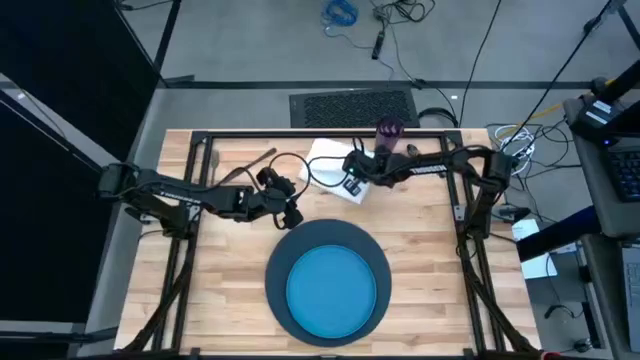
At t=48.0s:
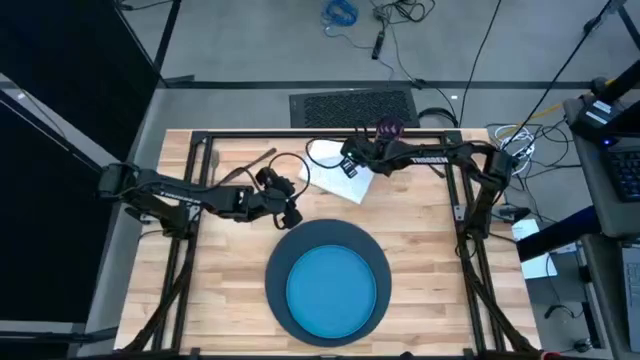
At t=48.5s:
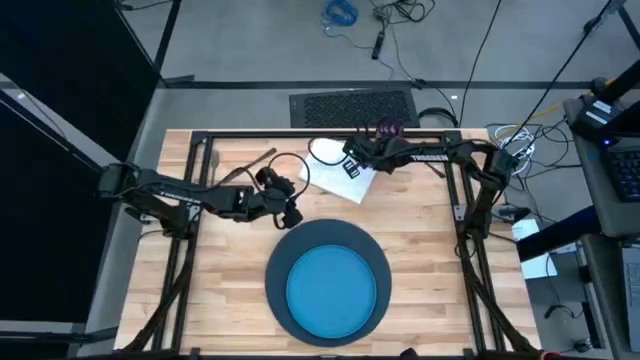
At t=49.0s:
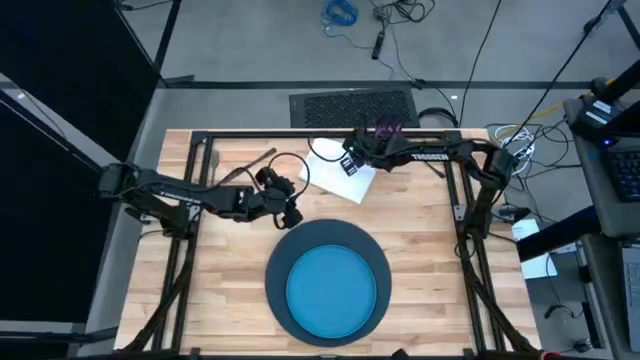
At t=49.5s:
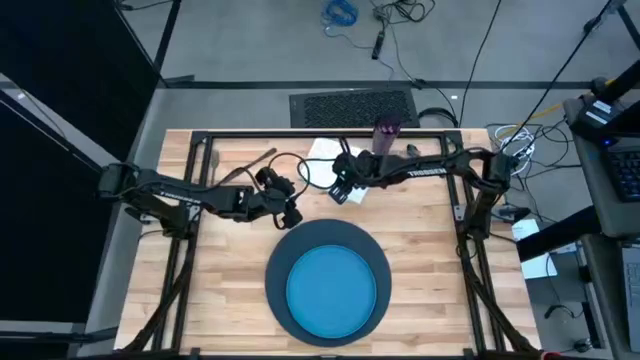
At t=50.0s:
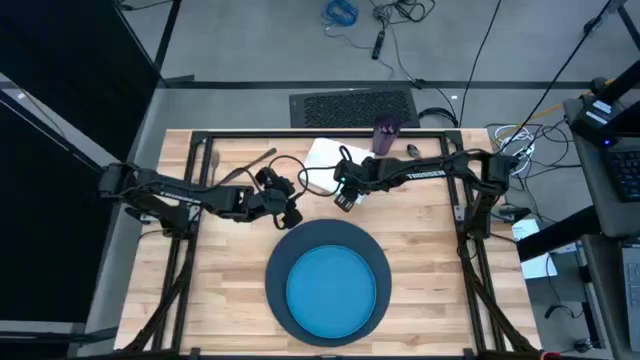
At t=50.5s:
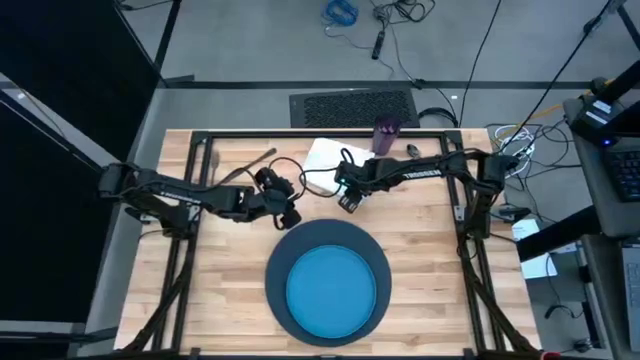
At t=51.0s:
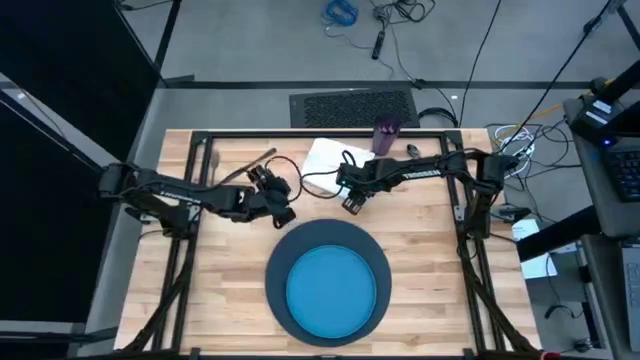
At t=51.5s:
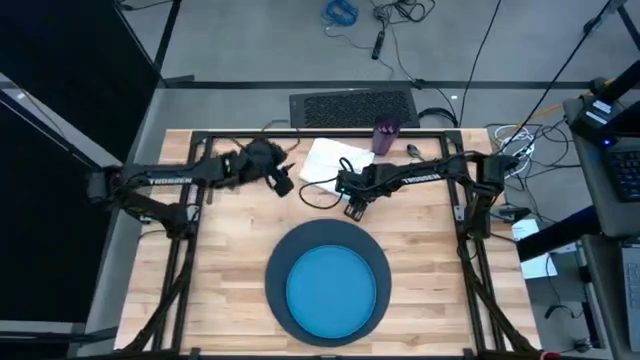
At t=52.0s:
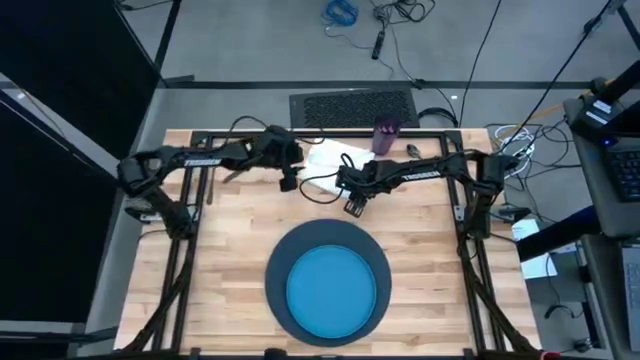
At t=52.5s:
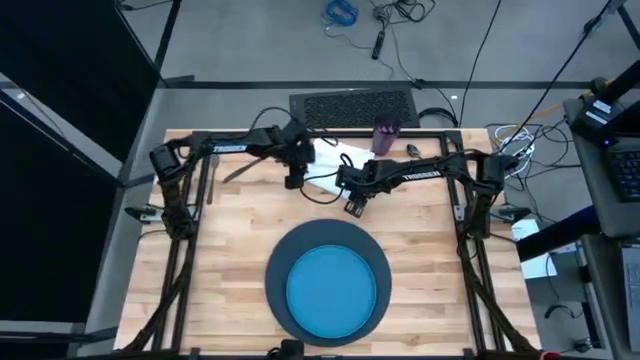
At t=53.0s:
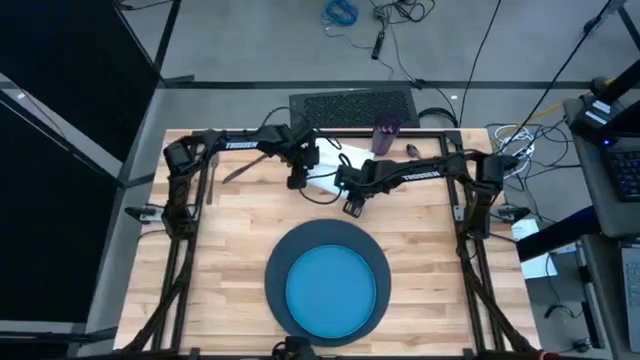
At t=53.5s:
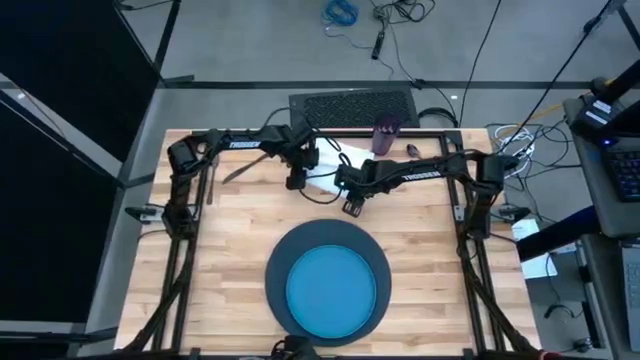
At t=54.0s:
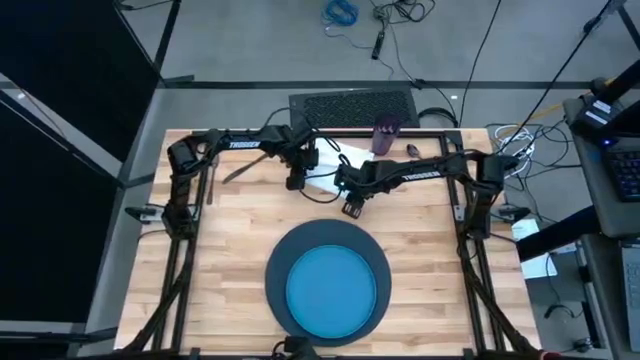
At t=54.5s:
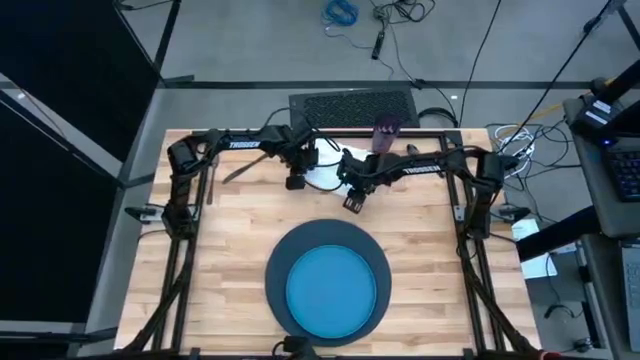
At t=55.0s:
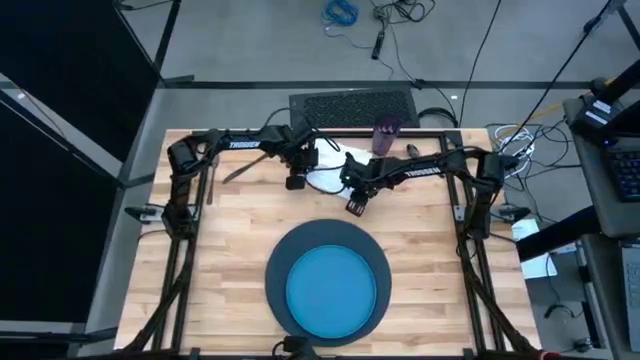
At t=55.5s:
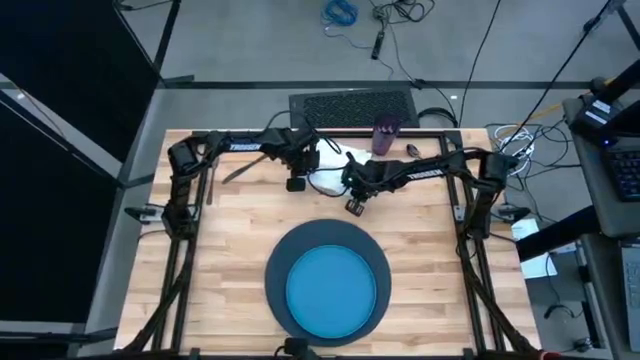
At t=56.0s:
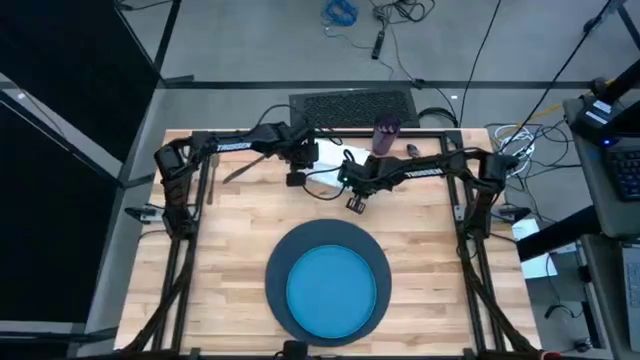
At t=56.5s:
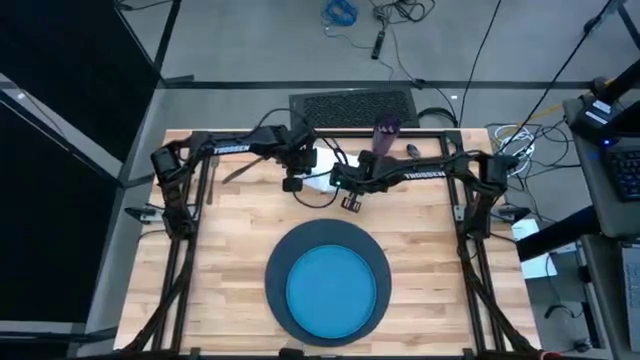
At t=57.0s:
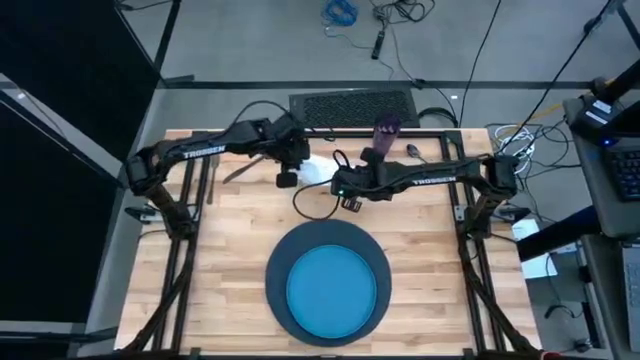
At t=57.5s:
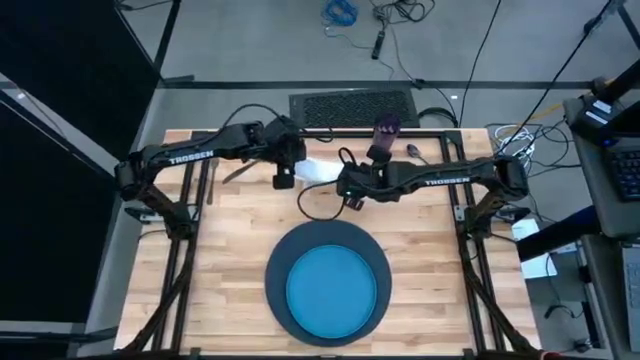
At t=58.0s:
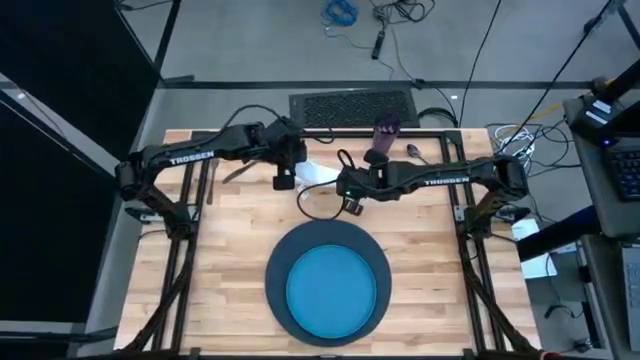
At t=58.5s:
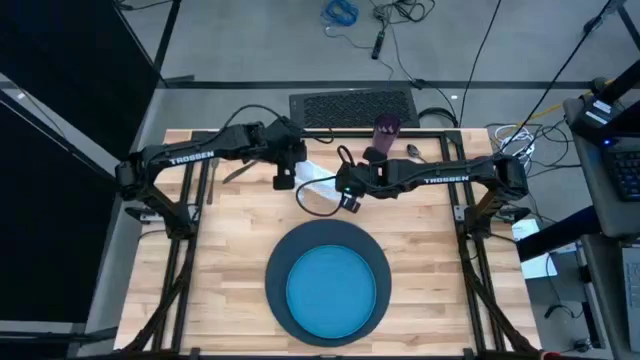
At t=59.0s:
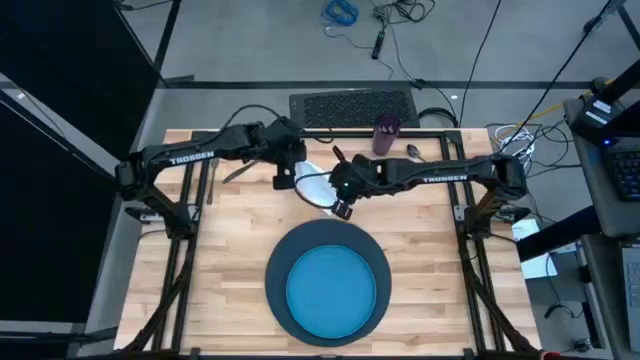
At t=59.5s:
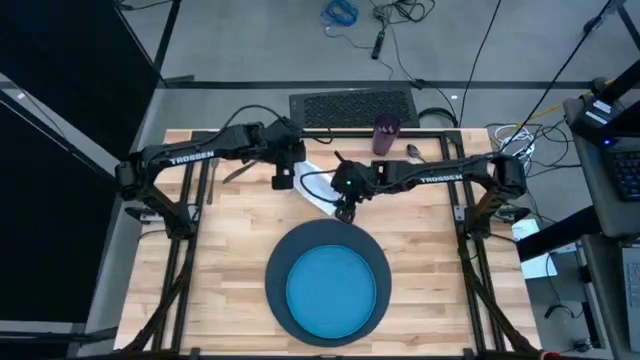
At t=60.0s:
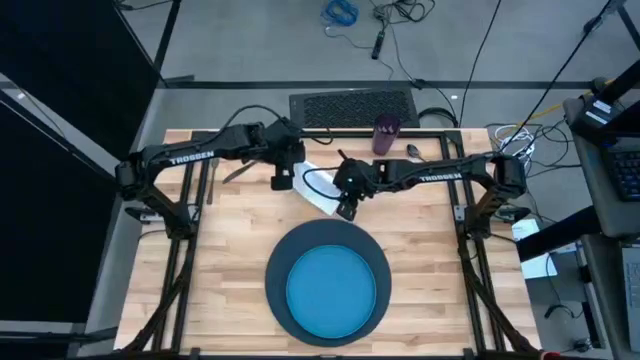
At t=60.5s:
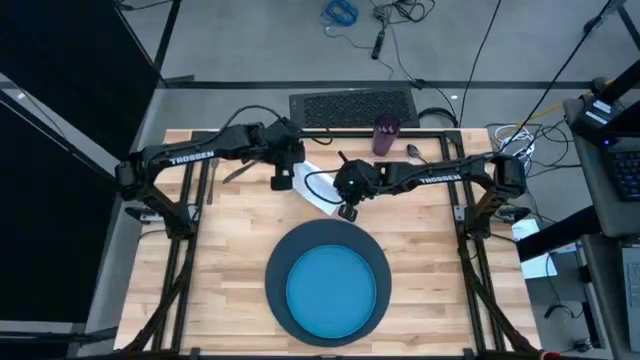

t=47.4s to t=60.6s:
Task: Set table place
Fold the white table napkin

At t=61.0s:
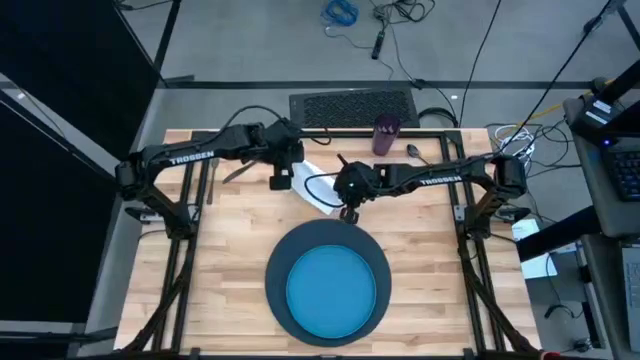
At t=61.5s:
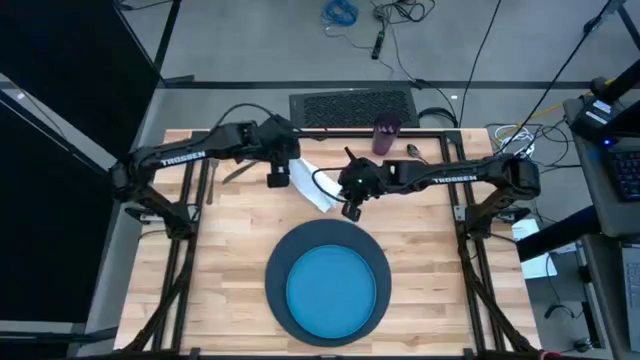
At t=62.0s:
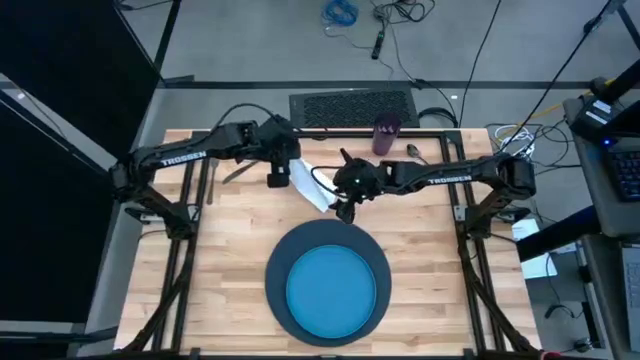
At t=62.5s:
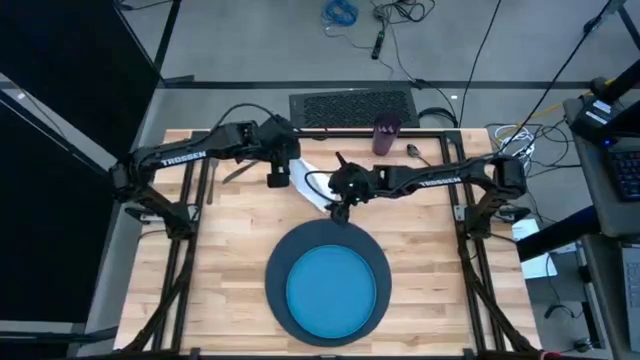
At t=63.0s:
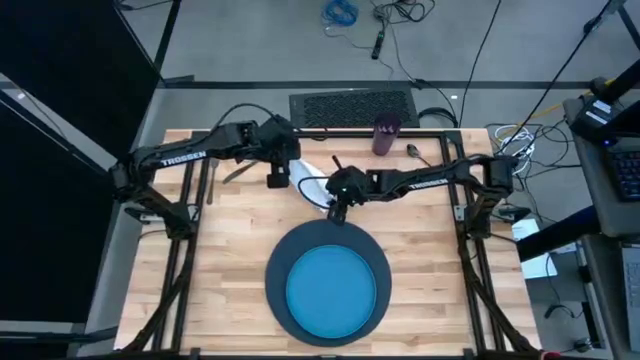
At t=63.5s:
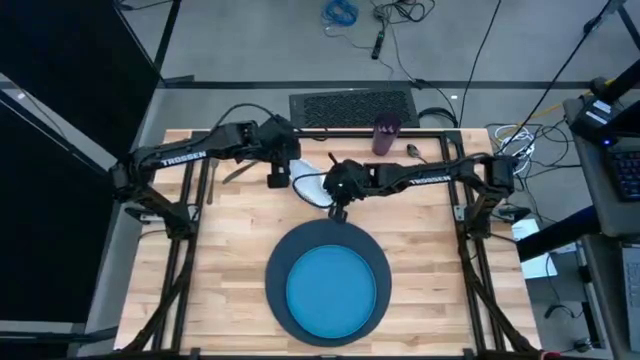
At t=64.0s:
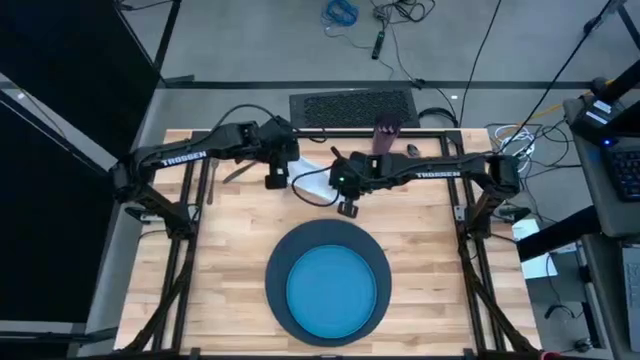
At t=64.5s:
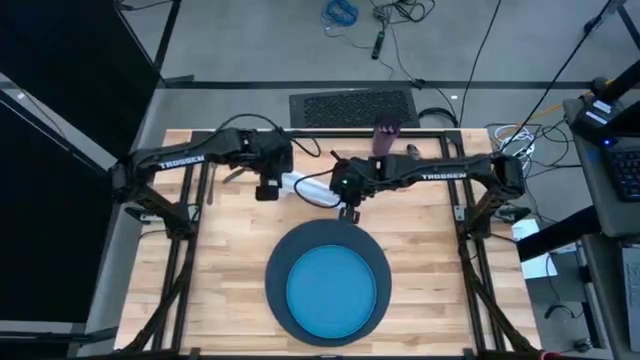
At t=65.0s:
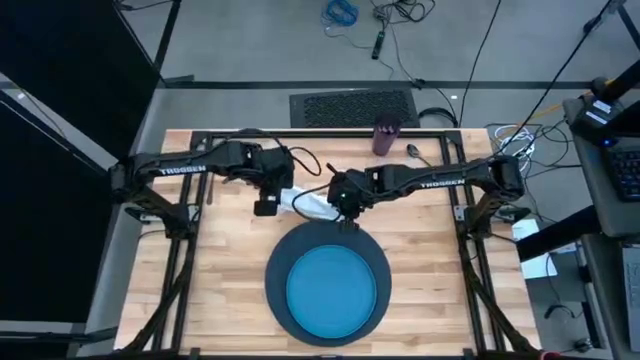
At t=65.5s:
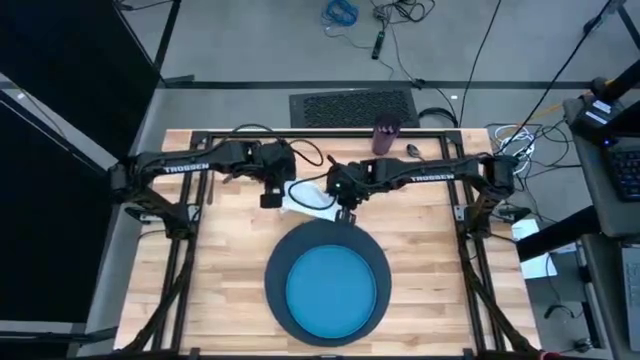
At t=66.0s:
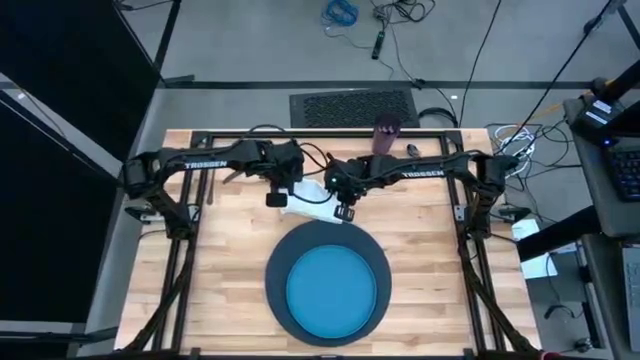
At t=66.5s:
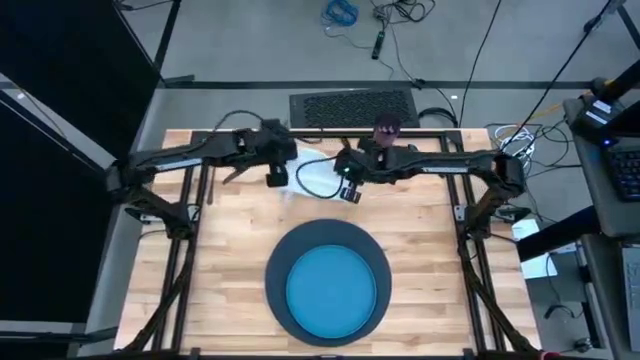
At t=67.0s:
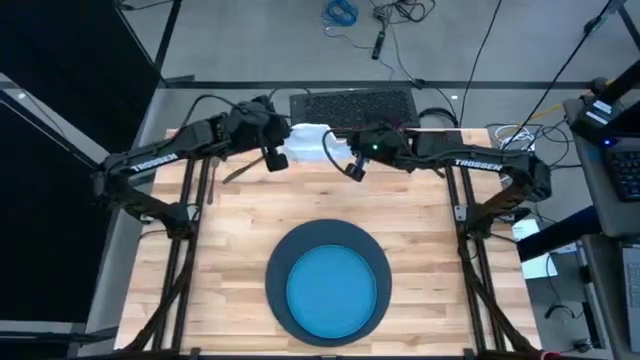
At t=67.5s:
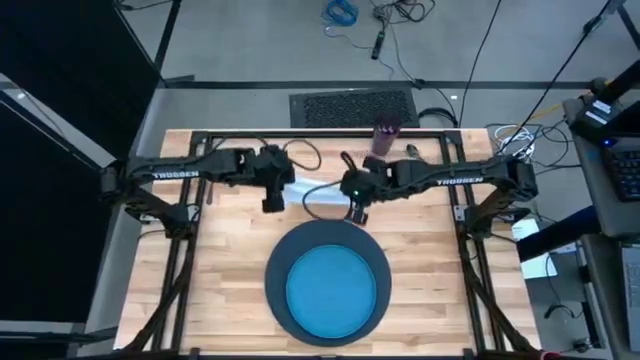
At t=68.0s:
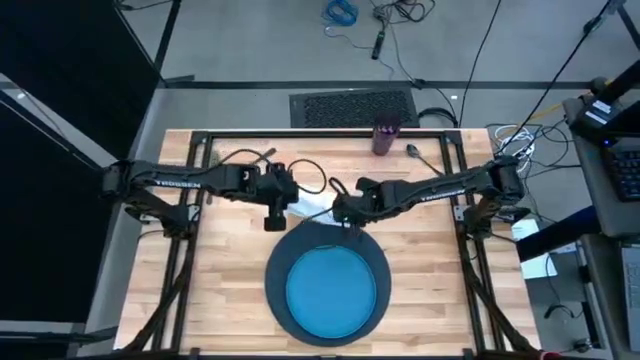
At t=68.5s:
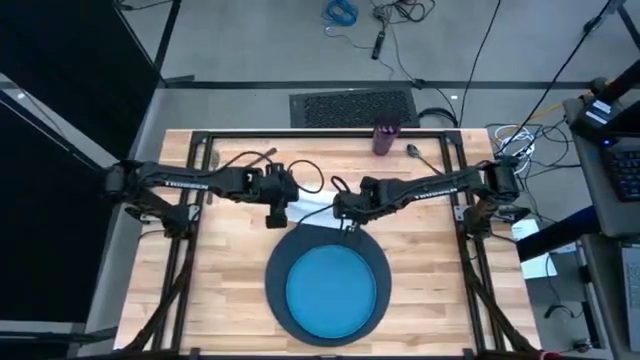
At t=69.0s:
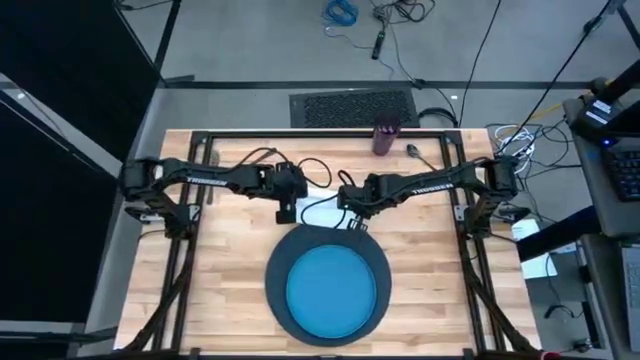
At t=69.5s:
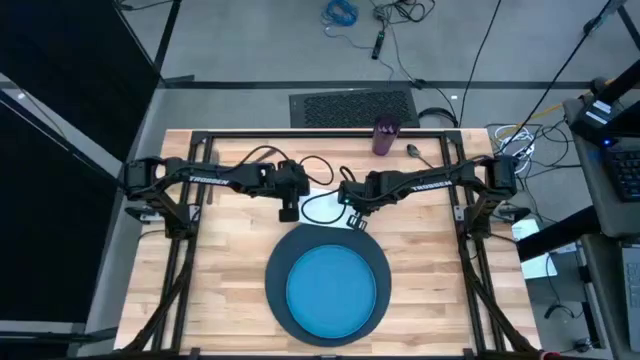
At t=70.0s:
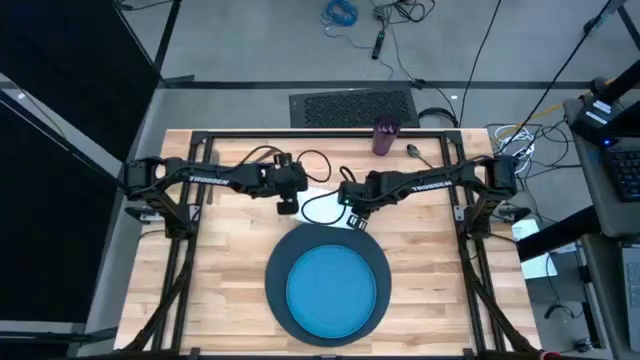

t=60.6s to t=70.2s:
Fold the white table napkin
